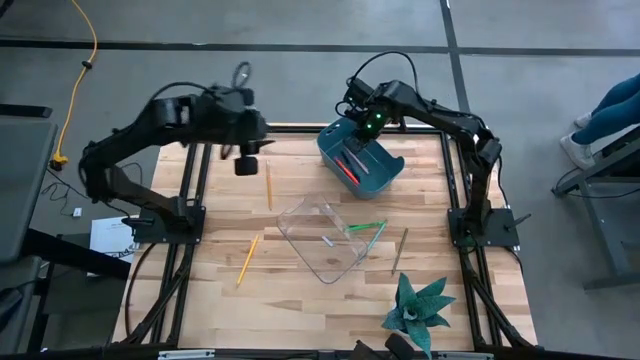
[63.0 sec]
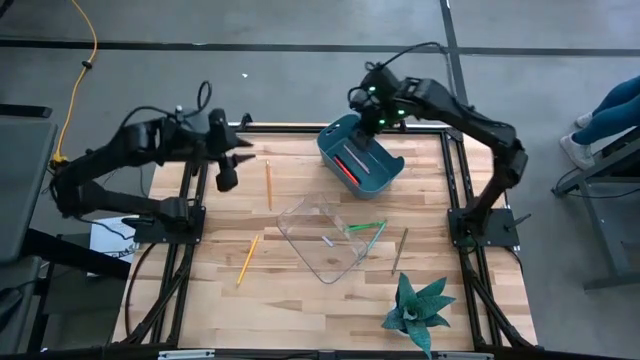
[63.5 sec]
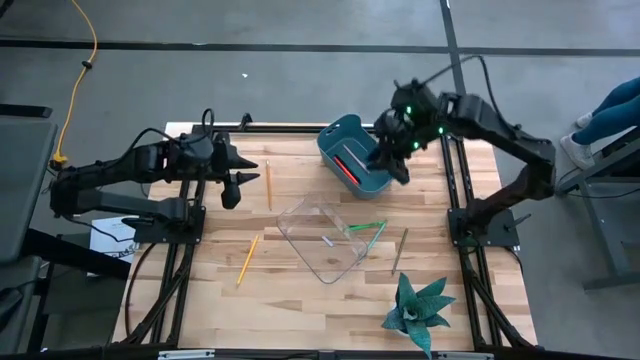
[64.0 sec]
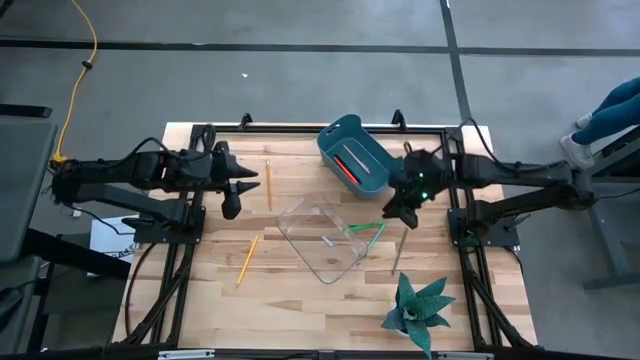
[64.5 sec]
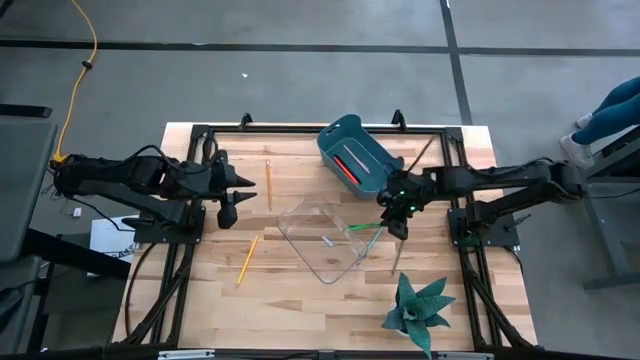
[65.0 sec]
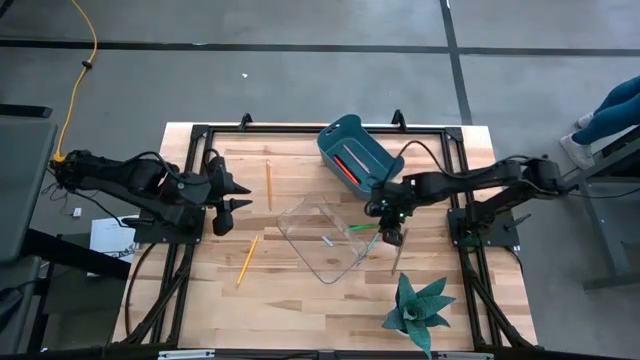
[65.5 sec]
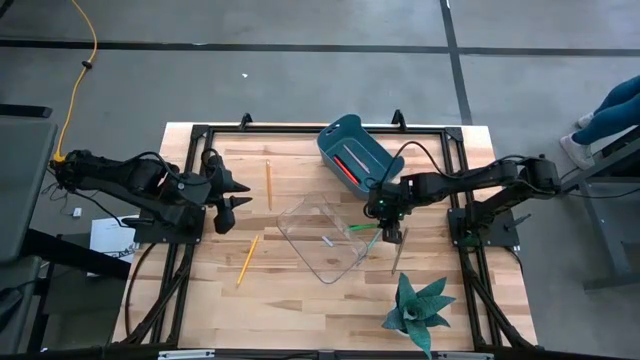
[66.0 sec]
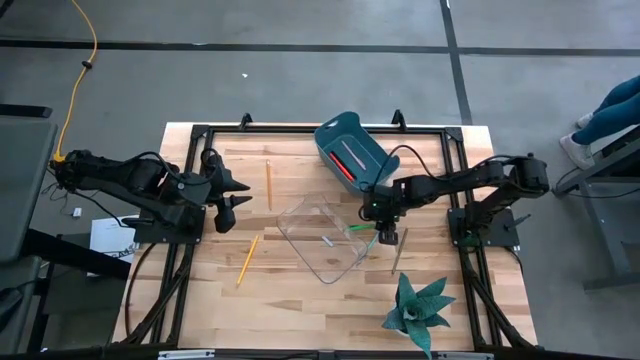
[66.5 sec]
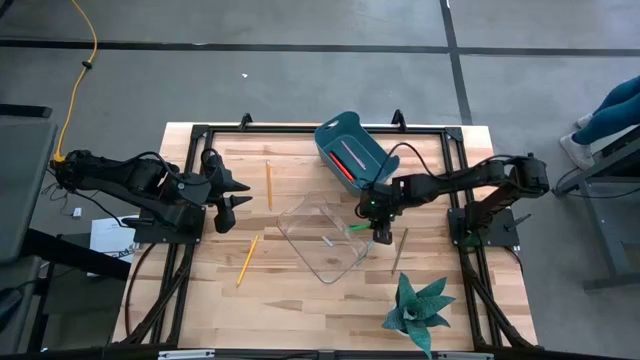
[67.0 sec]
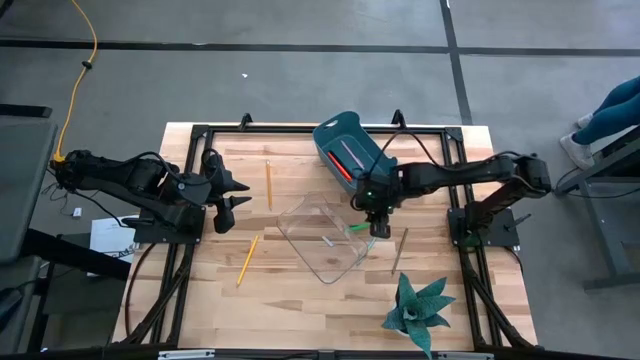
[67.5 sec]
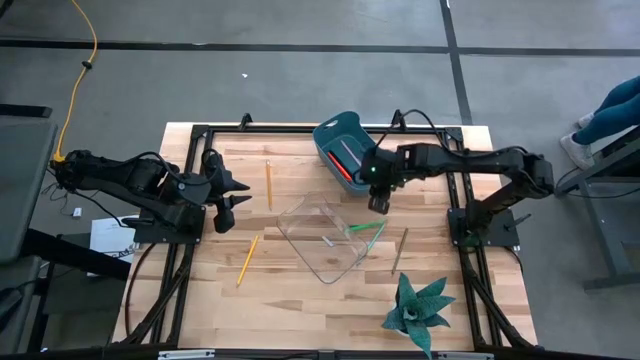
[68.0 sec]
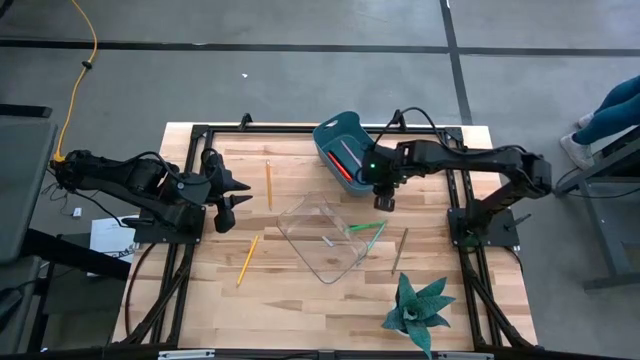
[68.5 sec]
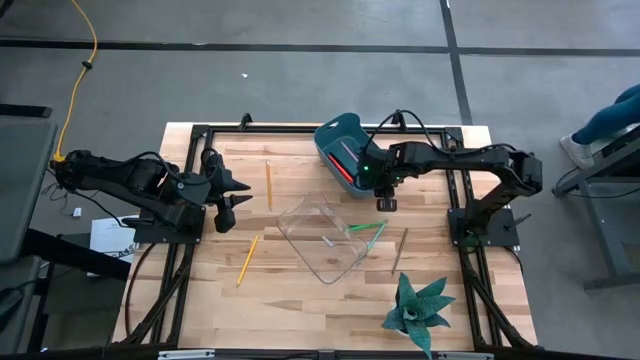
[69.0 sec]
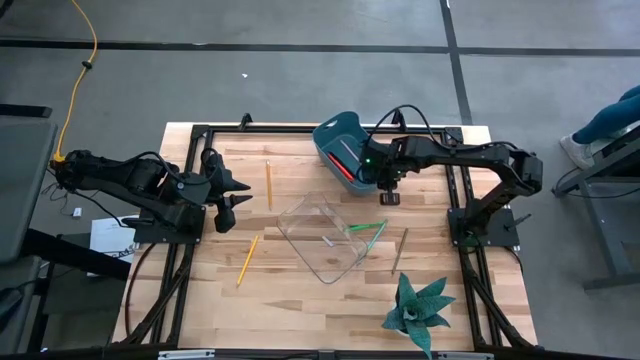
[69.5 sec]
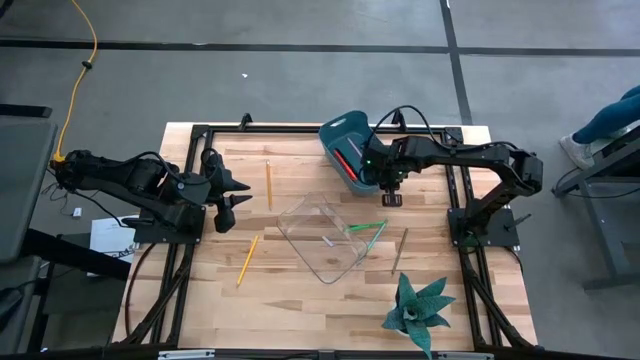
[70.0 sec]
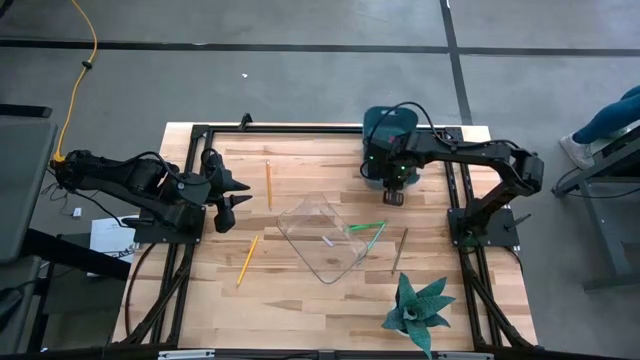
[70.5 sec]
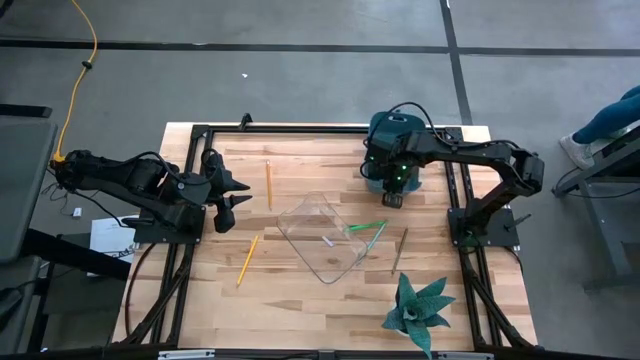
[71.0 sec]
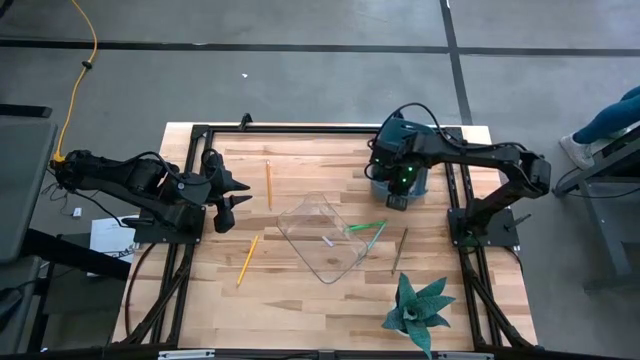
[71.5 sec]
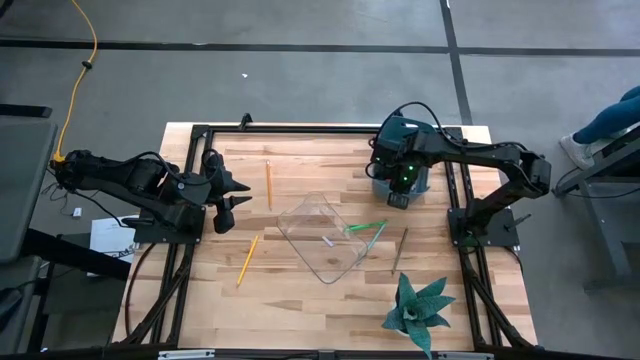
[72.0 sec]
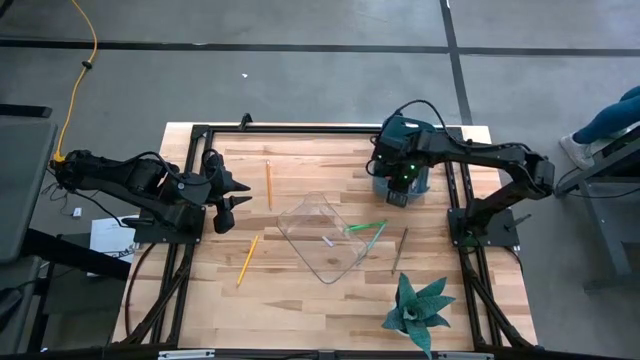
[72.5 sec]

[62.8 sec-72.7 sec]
Task: Sort pens & pencils
Adjust the blue bin

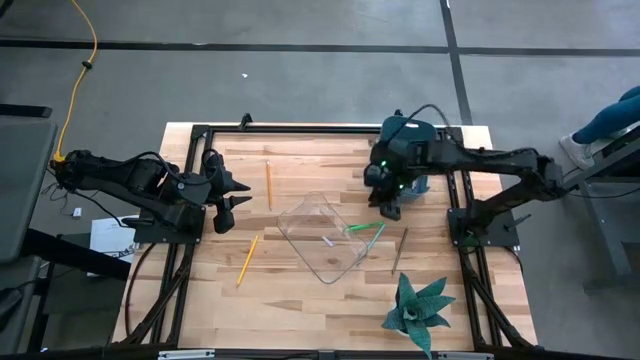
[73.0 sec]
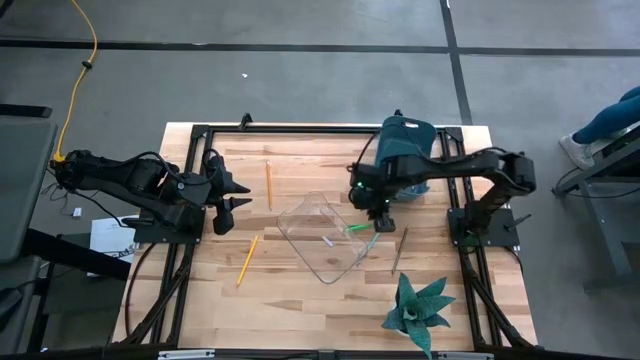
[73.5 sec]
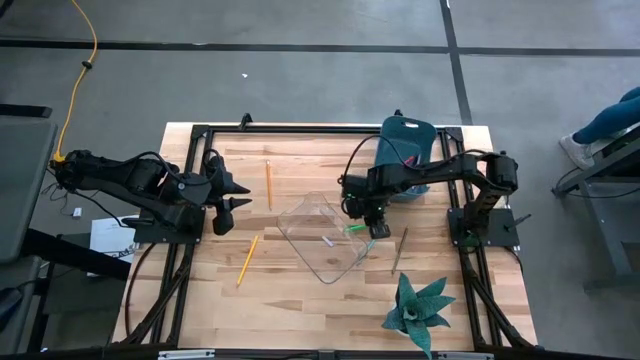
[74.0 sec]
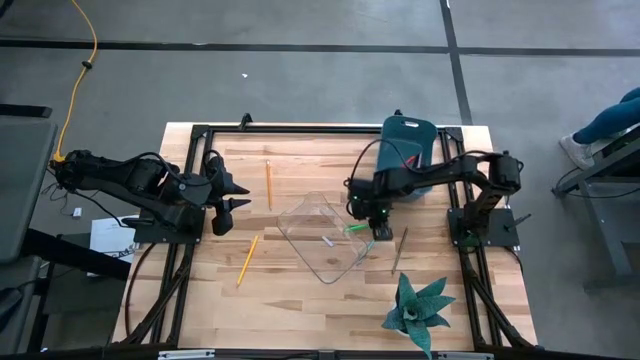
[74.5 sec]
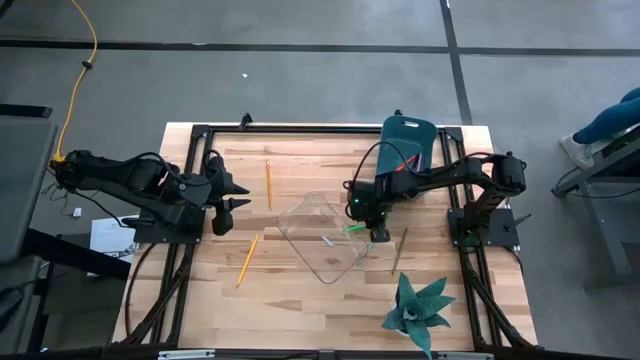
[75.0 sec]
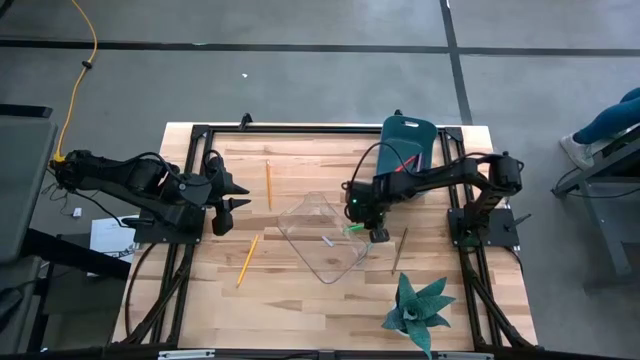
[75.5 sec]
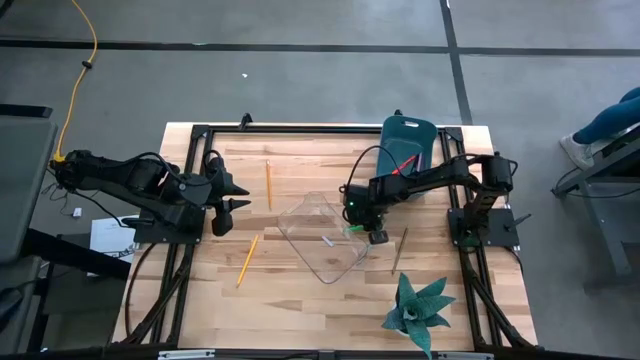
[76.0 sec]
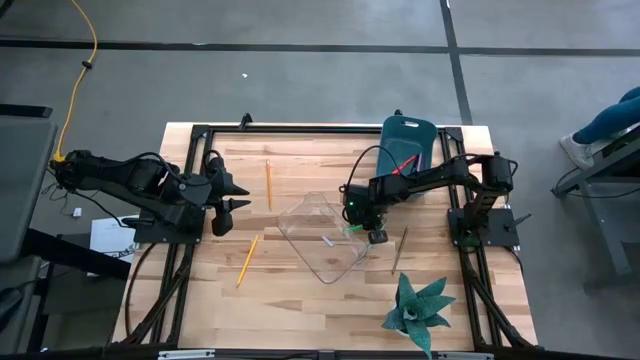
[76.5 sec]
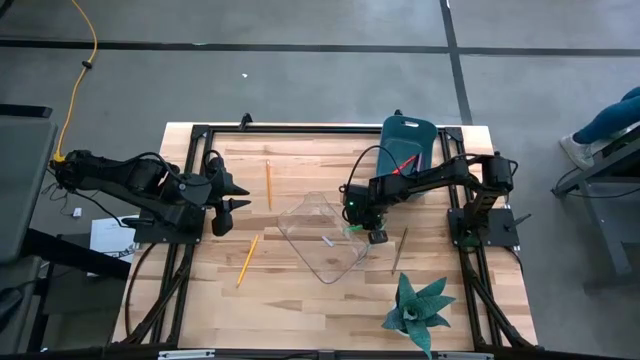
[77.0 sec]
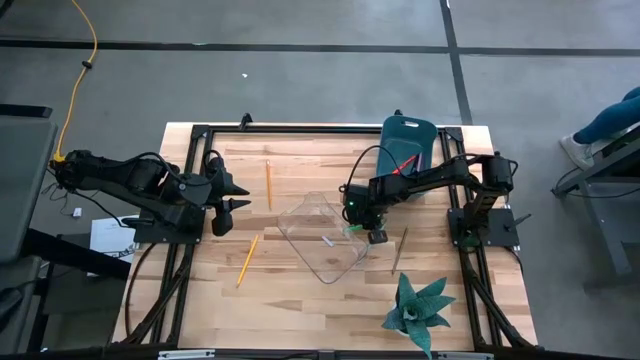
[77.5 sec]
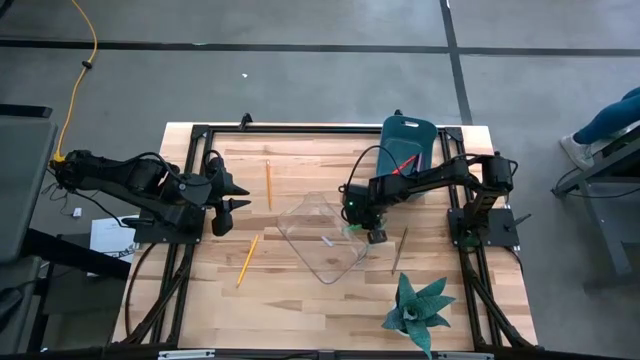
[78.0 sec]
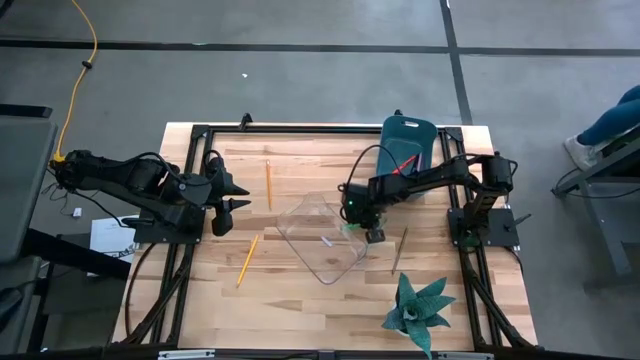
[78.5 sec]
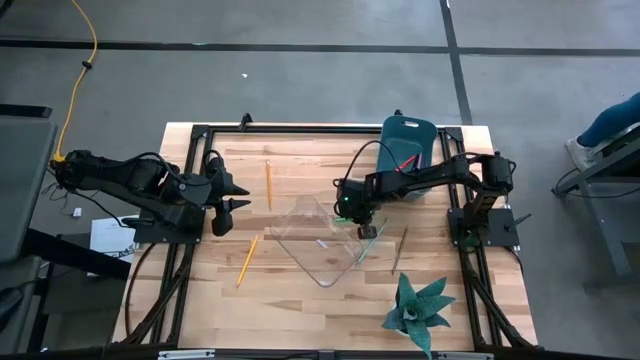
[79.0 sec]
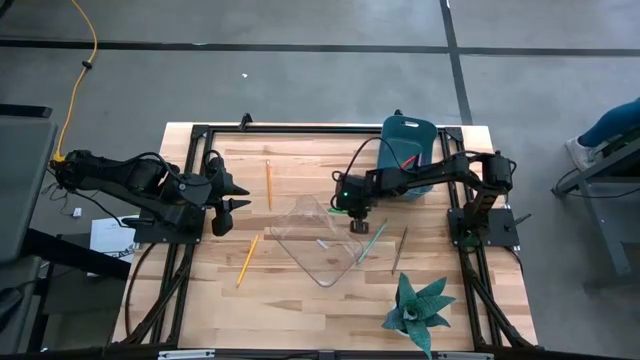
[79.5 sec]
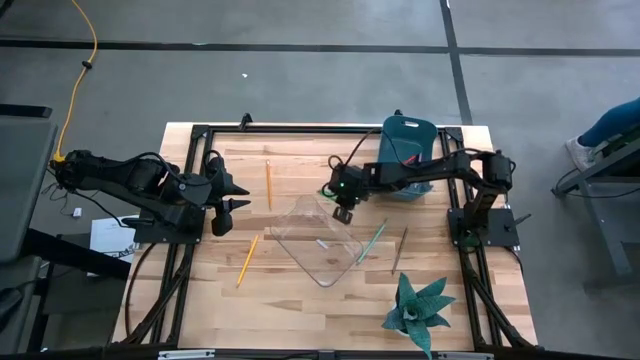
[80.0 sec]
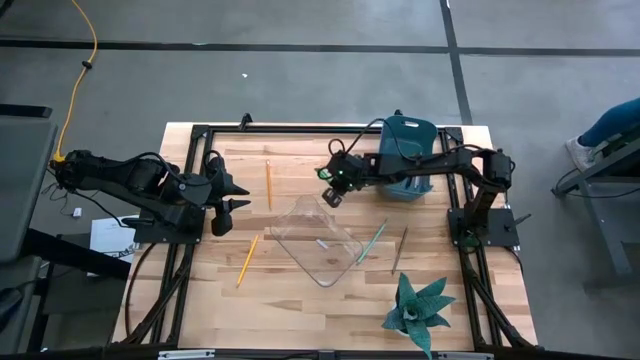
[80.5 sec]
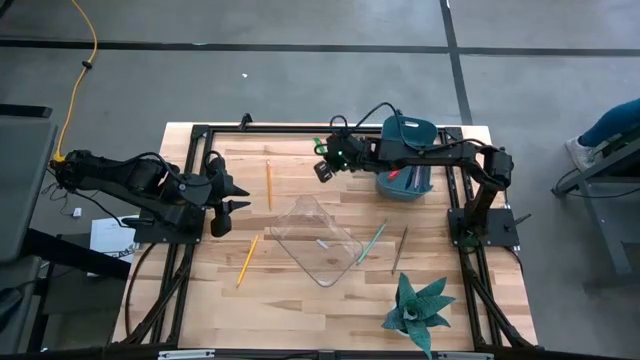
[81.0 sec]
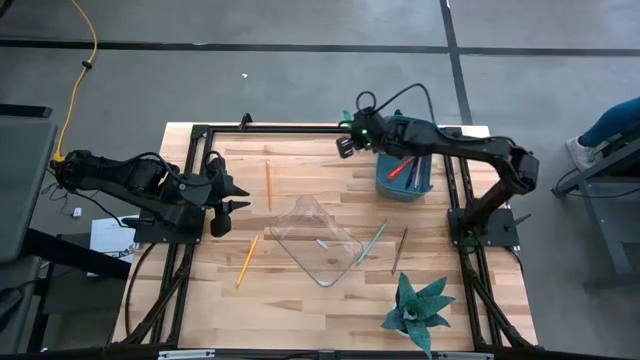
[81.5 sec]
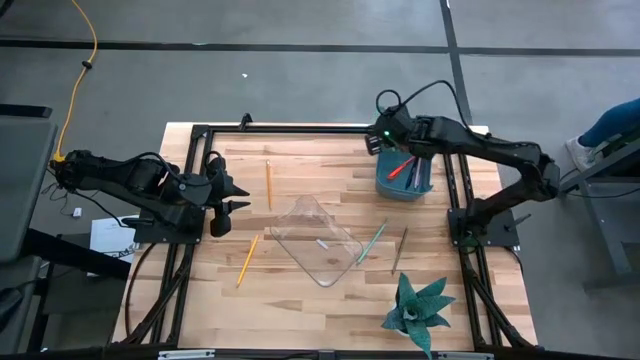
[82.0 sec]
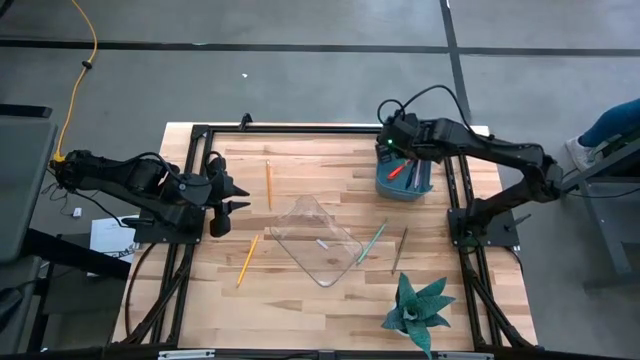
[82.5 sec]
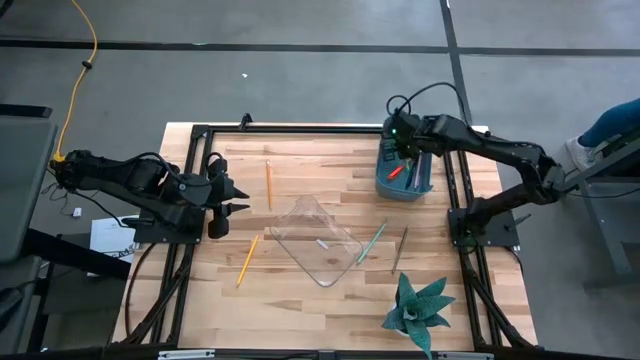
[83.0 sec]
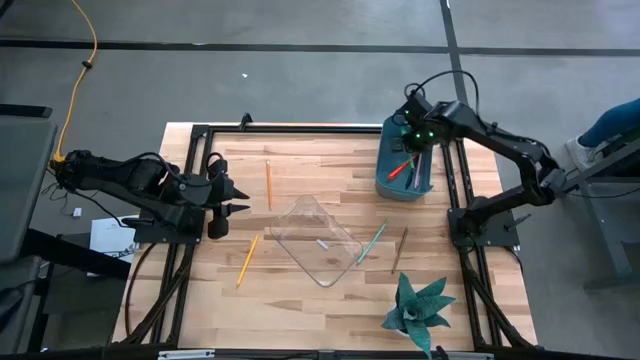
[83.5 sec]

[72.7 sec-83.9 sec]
Put the green pen into the blue bin
